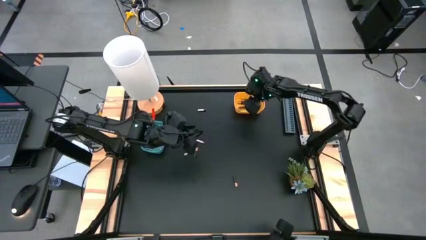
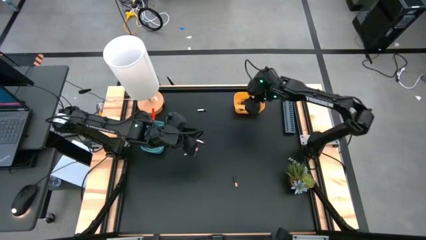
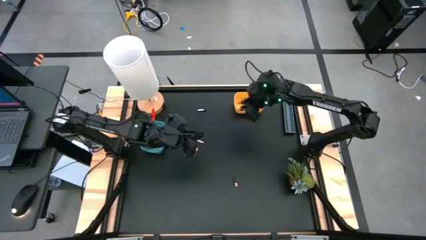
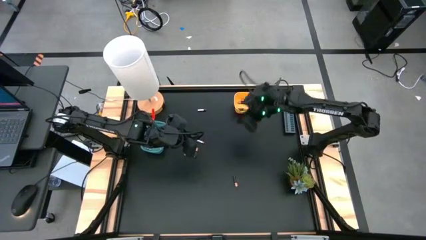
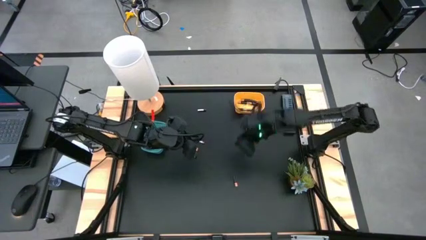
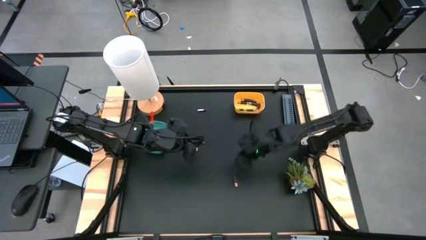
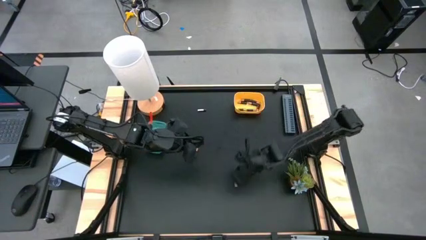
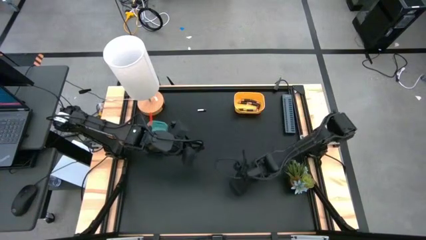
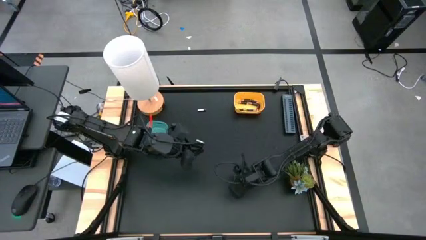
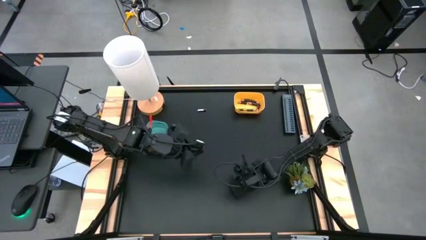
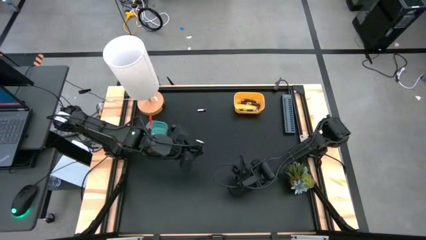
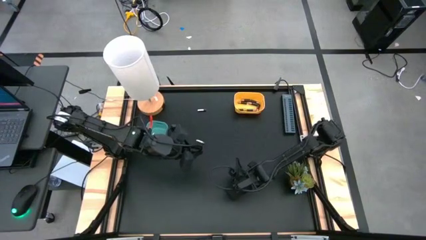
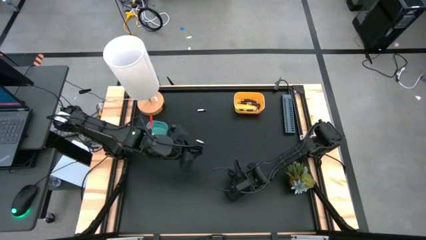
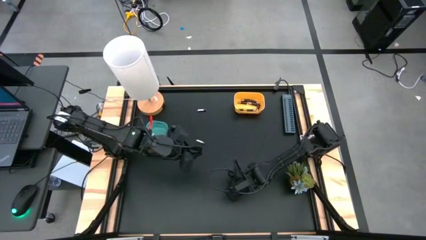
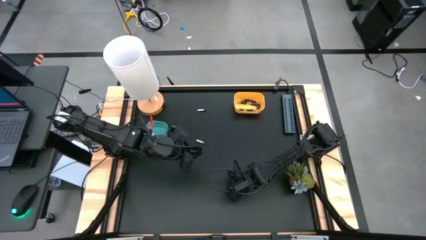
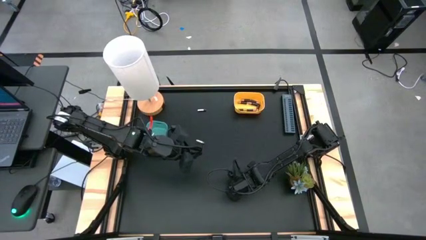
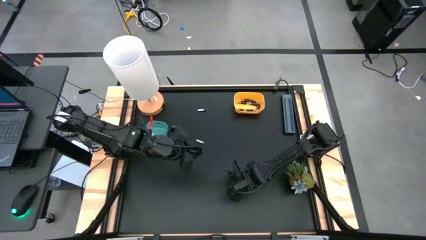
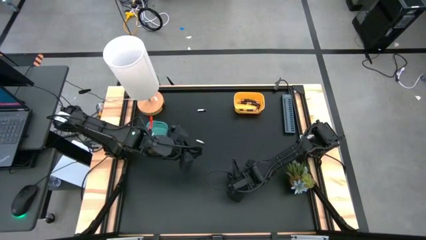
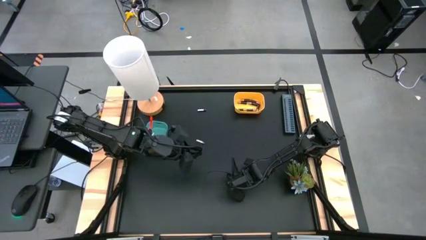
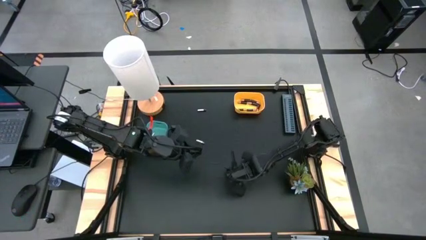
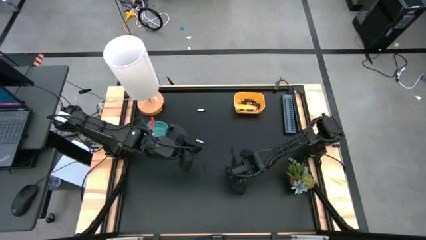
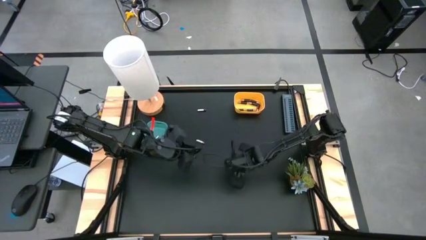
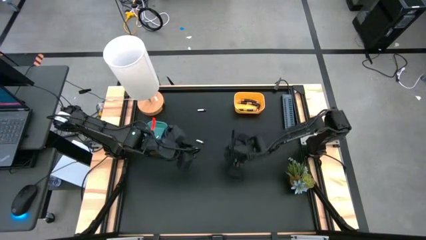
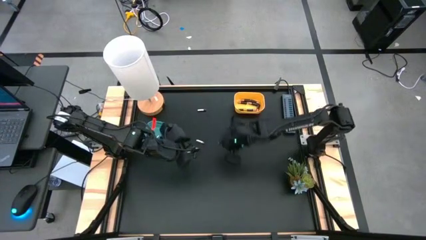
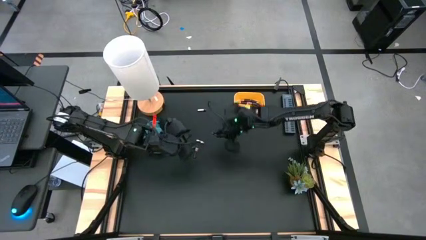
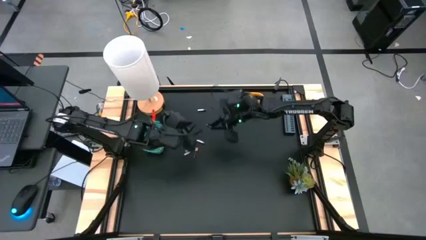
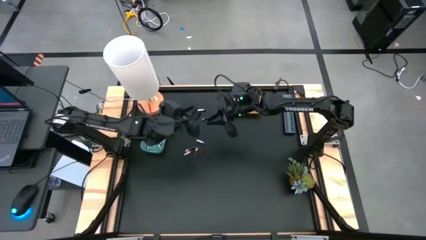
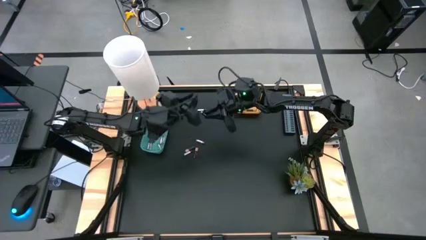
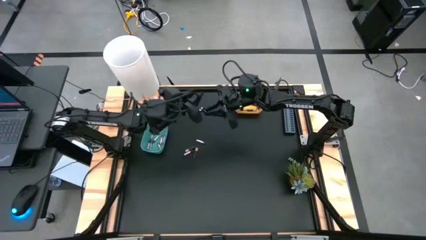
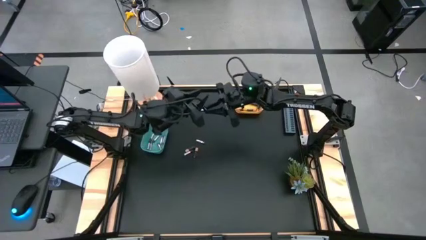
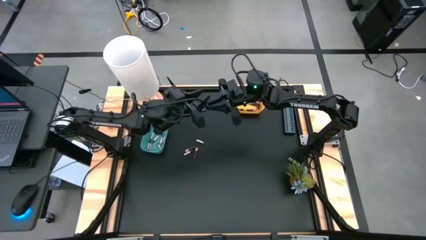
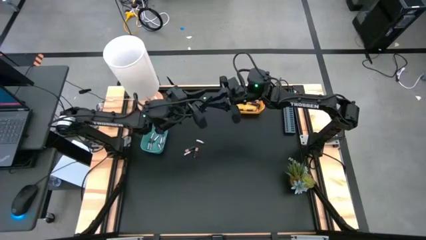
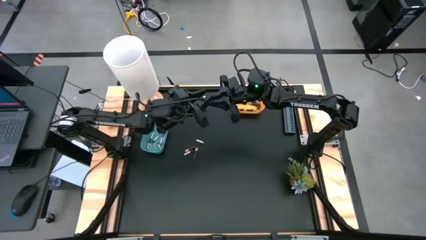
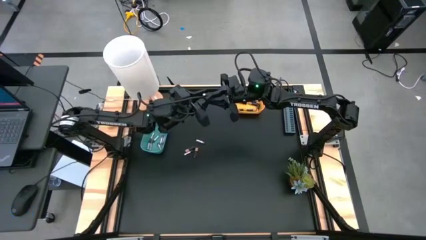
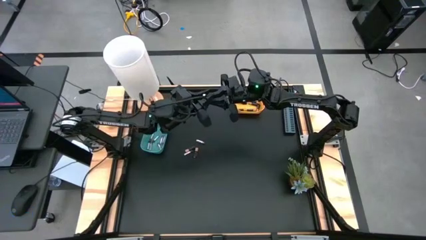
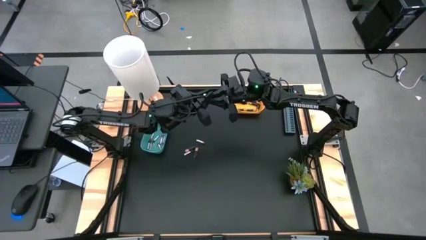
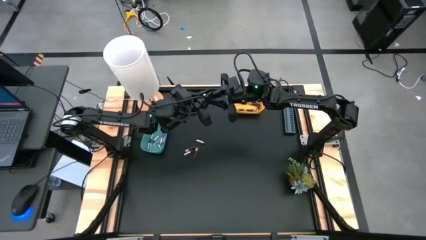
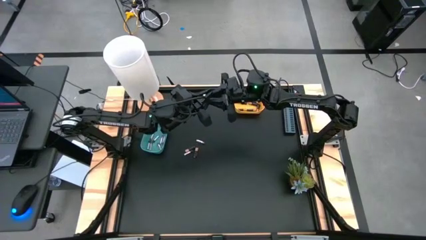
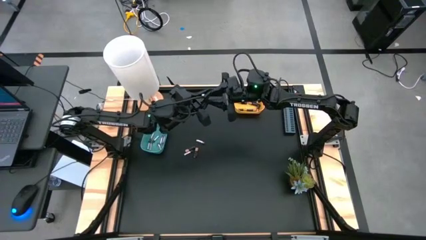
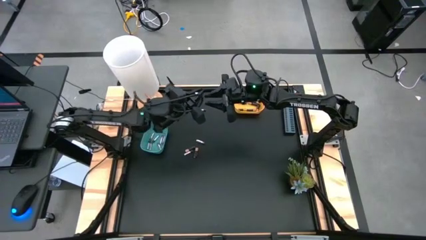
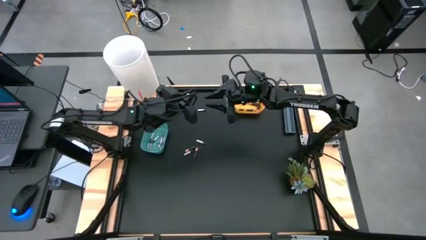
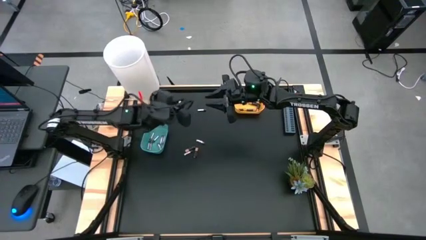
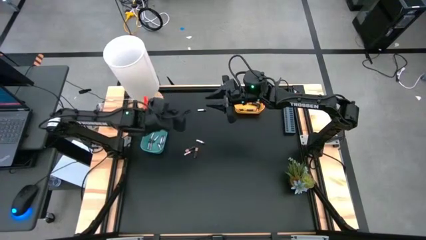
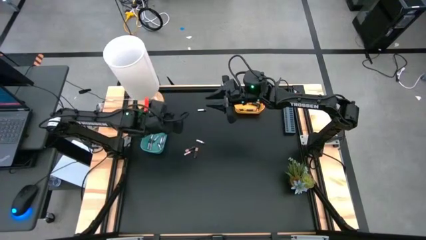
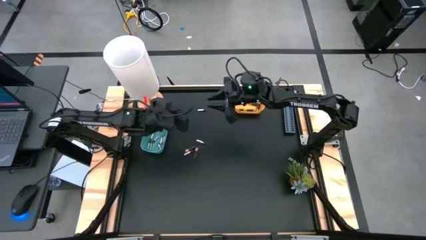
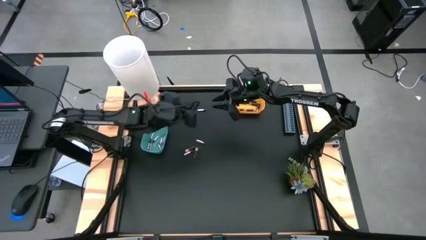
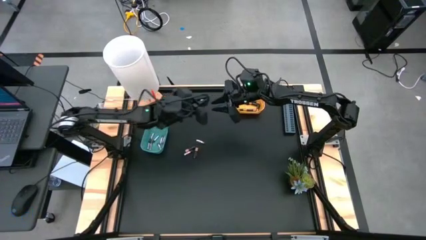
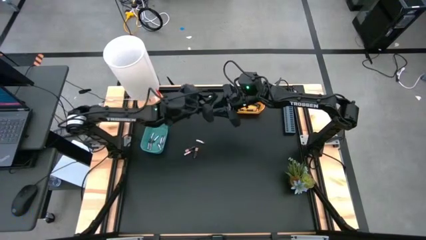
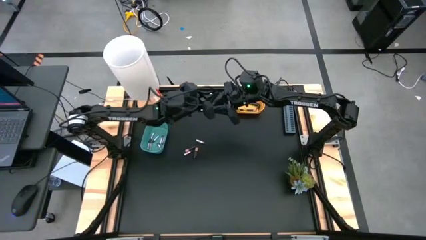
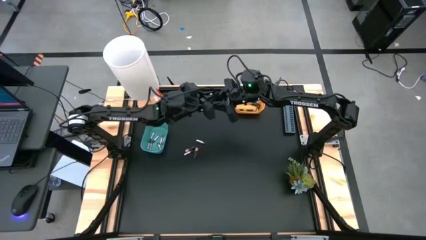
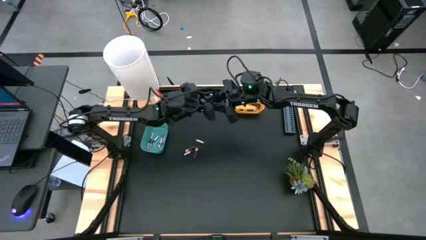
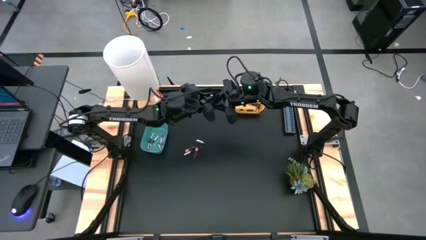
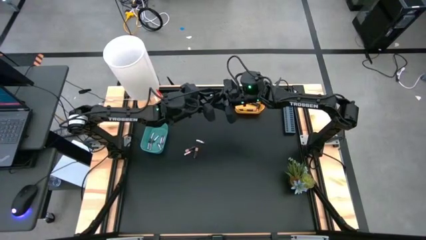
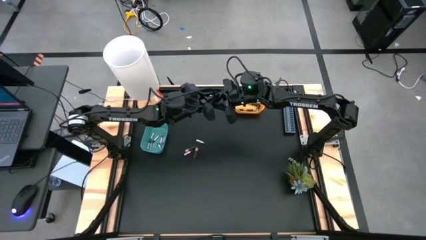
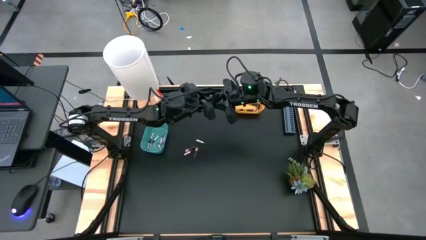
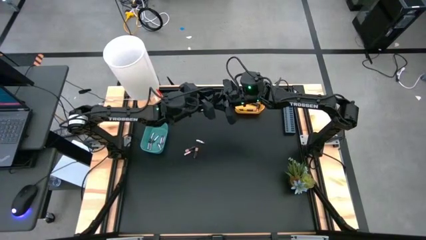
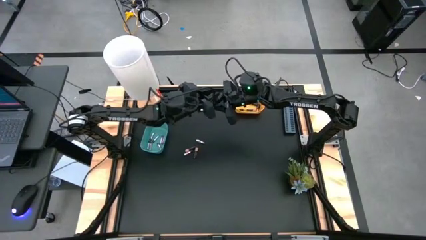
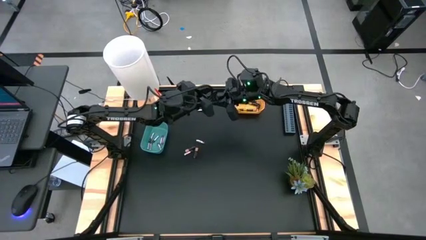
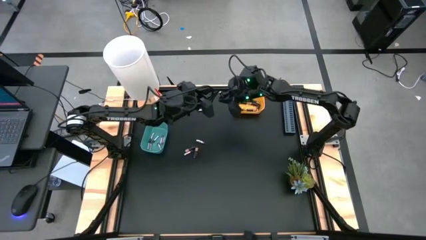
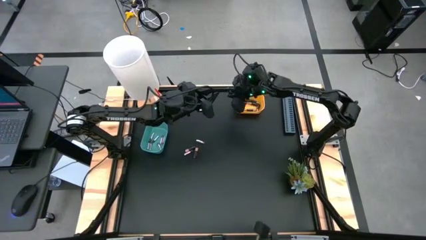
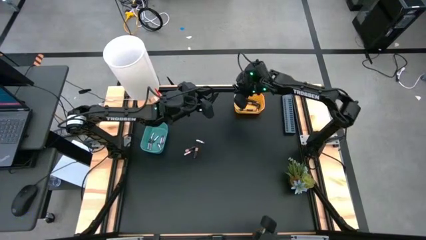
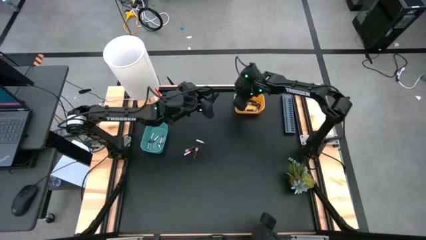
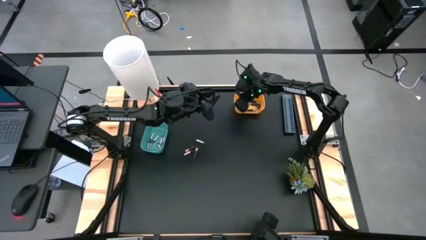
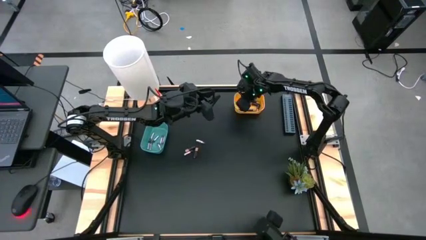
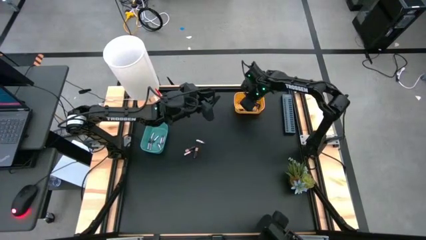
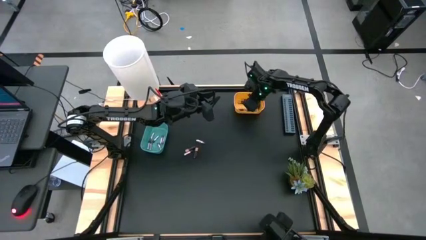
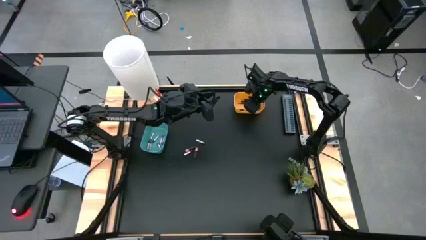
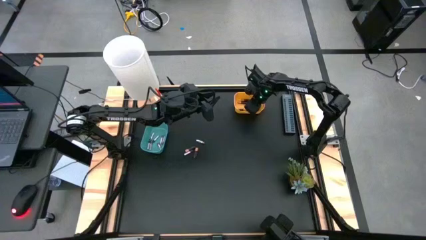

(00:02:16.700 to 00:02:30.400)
Task: Sort batteries
Put the black battery into the yellow bin

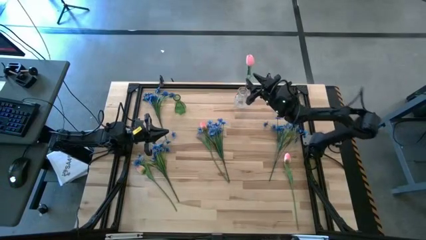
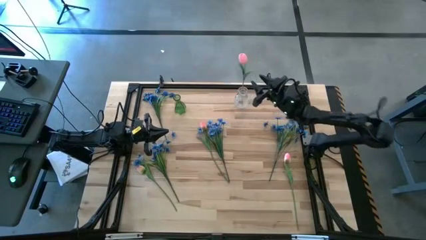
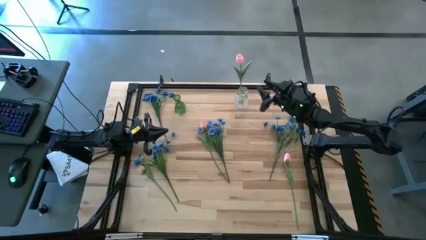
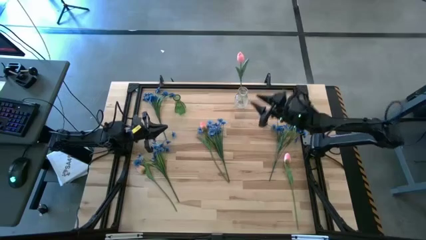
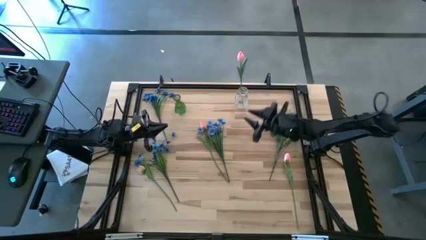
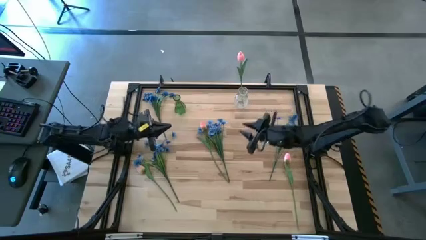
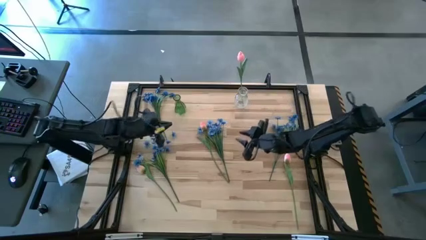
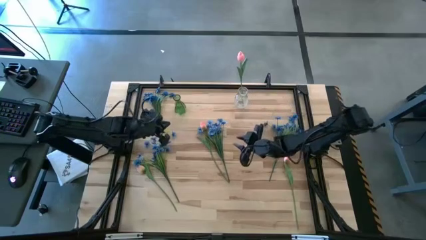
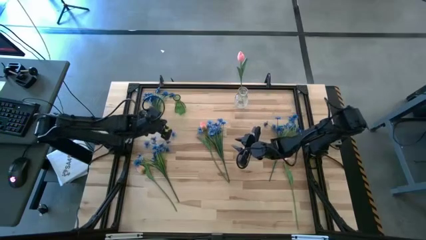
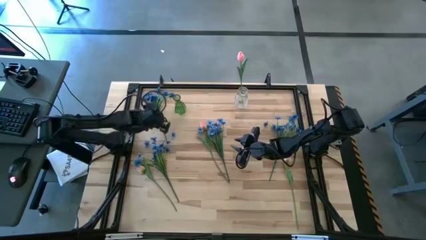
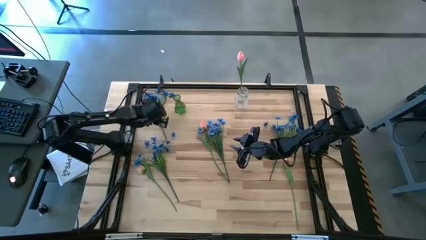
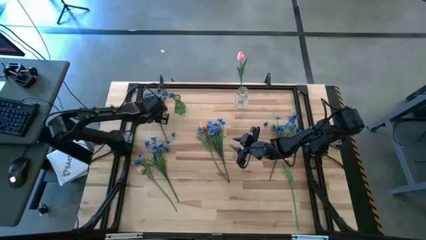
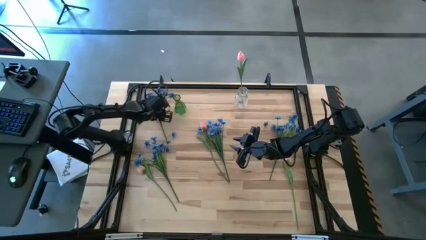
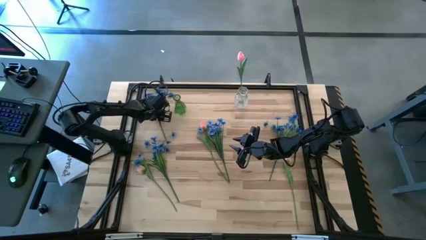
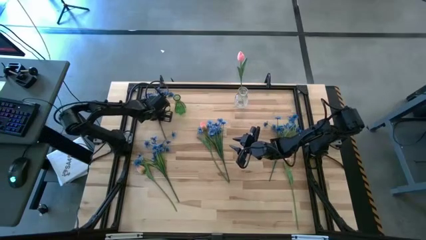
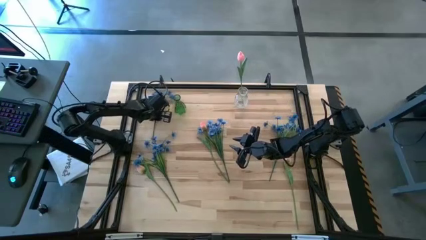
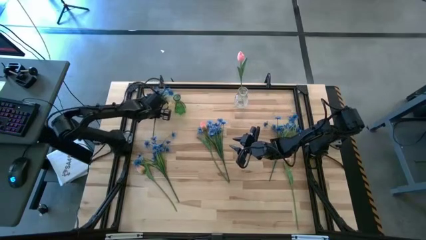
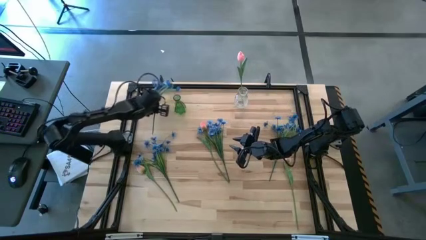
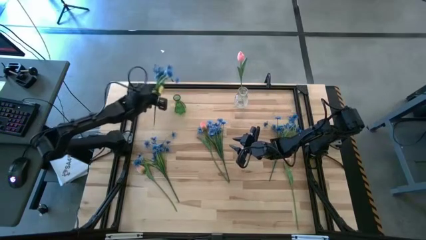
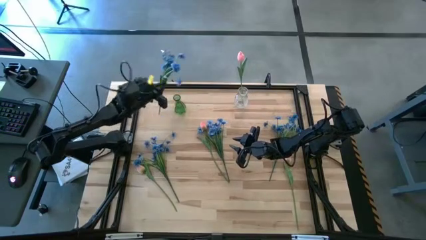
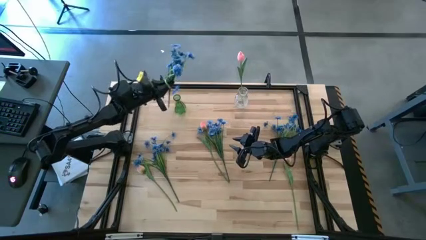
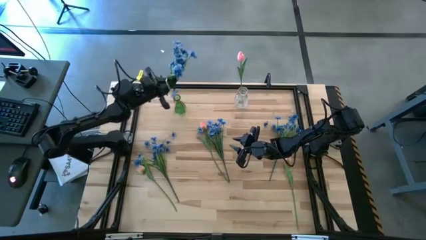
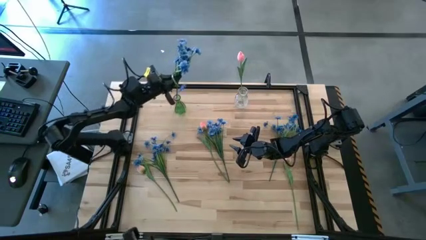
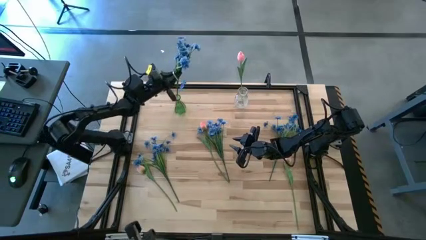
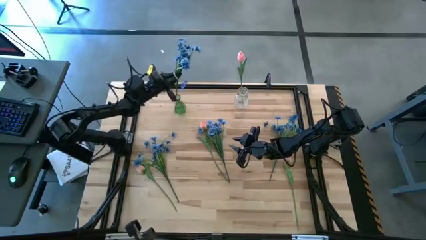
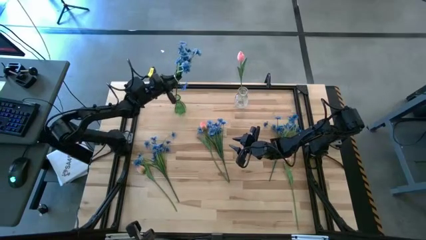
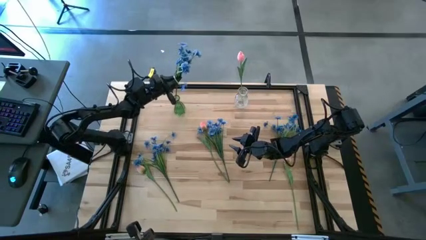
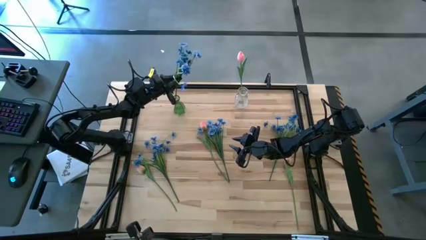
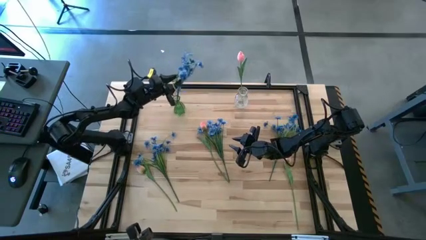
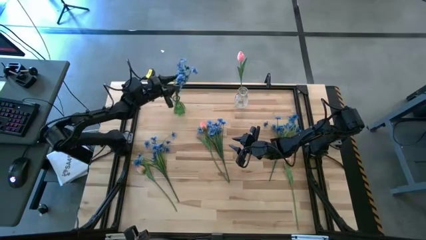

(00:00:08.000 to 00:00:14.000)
Task: Sort flowers into vase by color
Put the top left blue flowers into the green vase
